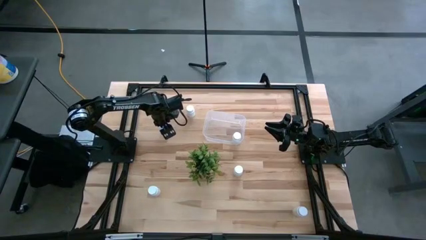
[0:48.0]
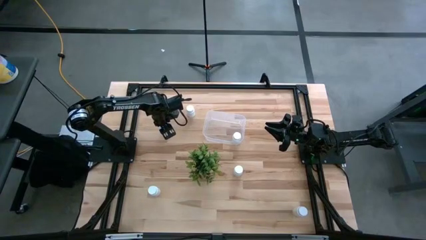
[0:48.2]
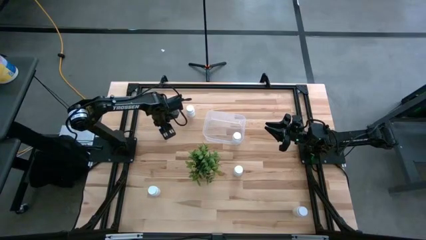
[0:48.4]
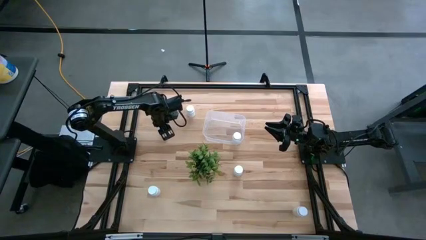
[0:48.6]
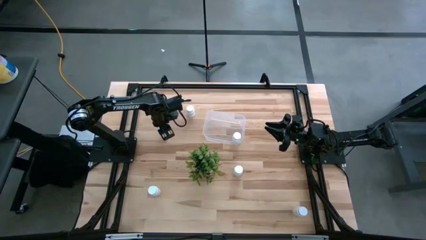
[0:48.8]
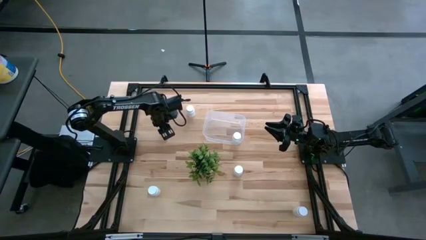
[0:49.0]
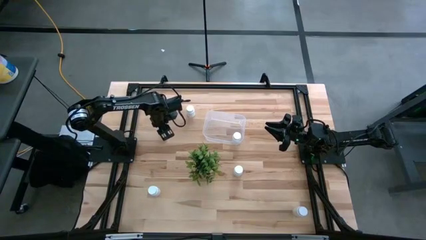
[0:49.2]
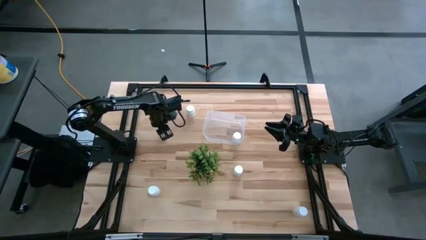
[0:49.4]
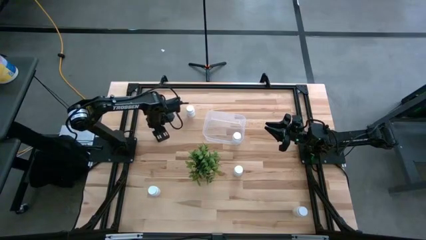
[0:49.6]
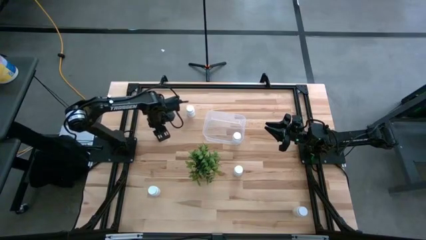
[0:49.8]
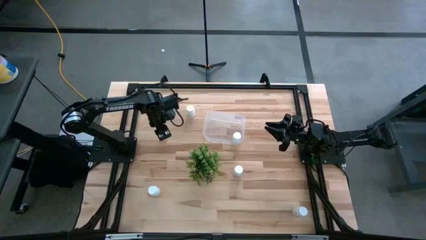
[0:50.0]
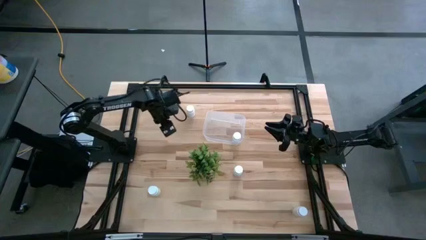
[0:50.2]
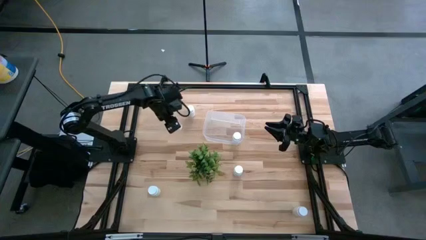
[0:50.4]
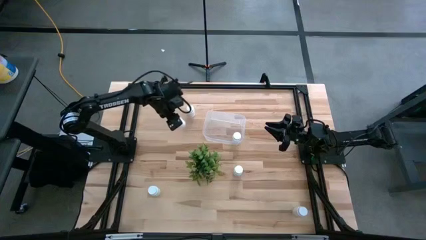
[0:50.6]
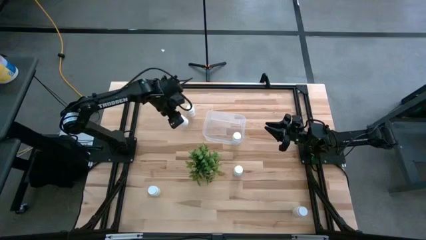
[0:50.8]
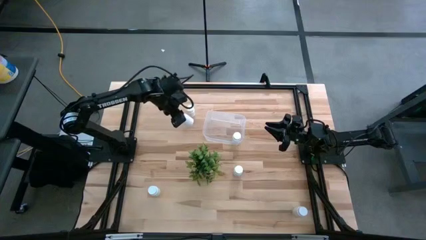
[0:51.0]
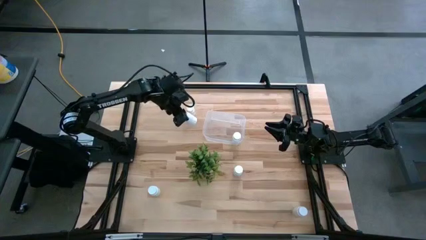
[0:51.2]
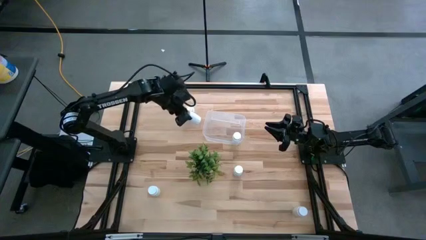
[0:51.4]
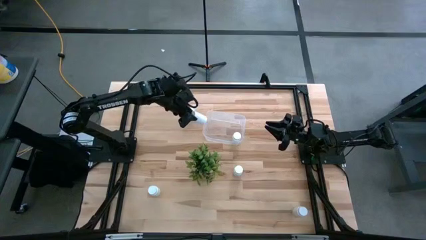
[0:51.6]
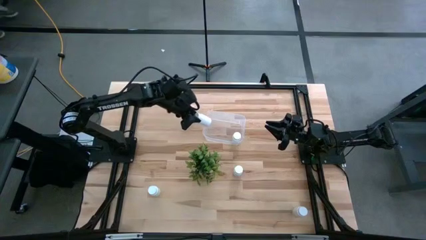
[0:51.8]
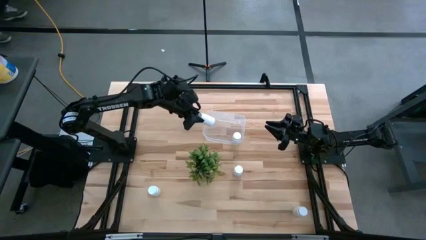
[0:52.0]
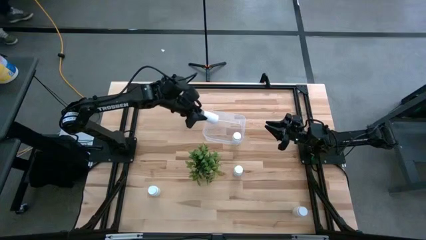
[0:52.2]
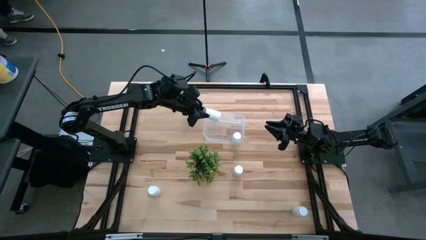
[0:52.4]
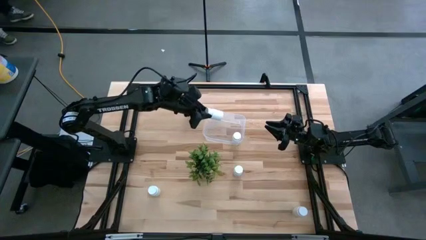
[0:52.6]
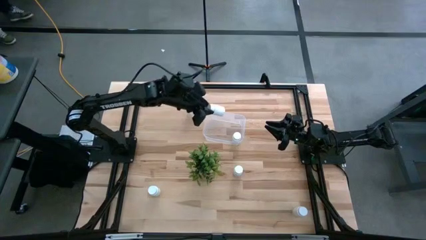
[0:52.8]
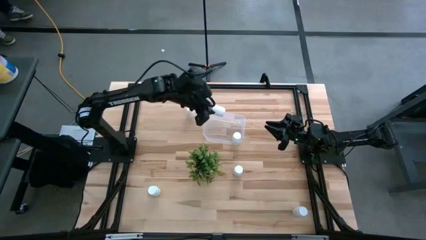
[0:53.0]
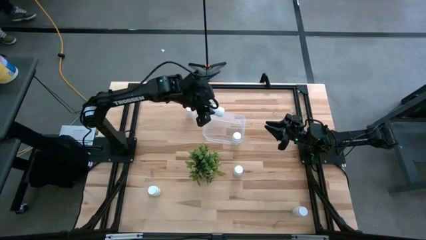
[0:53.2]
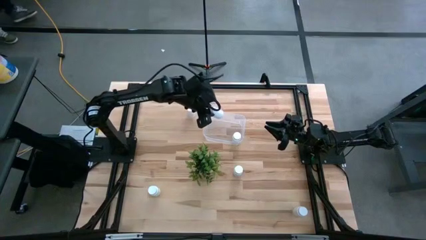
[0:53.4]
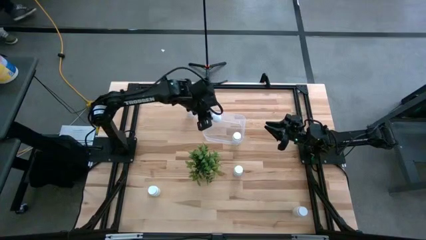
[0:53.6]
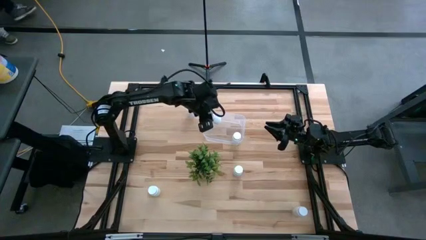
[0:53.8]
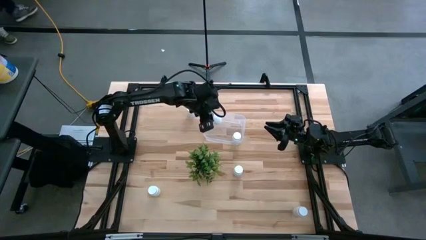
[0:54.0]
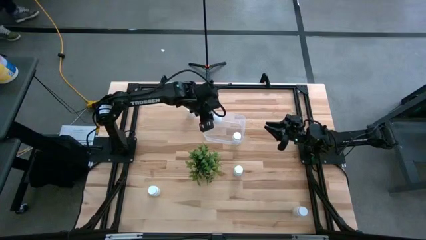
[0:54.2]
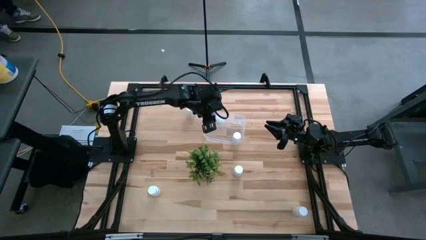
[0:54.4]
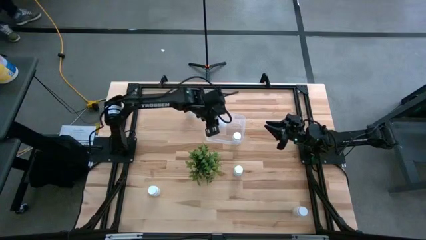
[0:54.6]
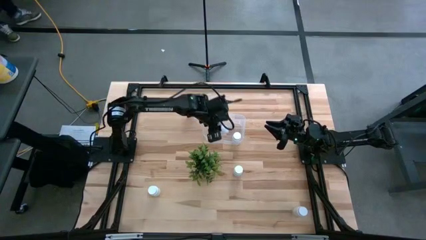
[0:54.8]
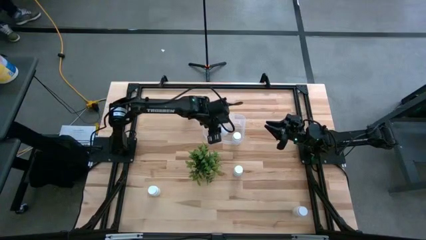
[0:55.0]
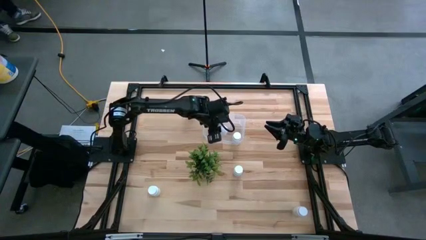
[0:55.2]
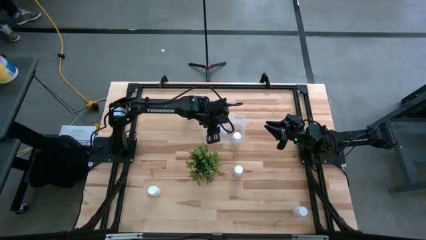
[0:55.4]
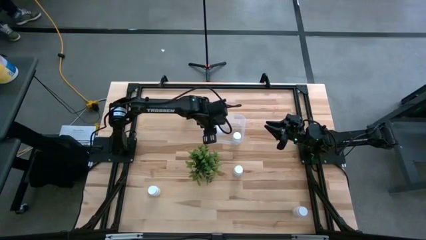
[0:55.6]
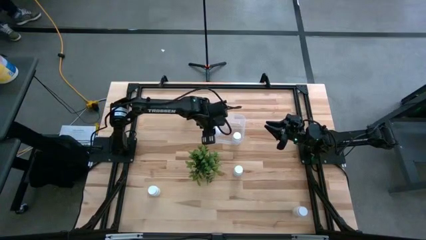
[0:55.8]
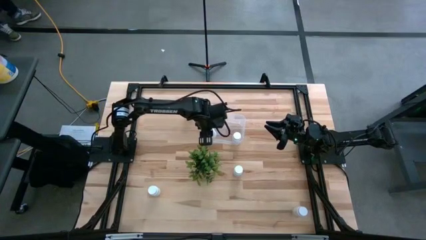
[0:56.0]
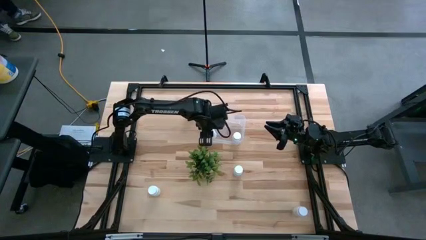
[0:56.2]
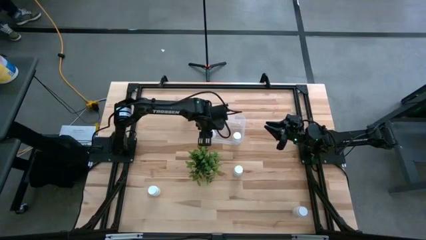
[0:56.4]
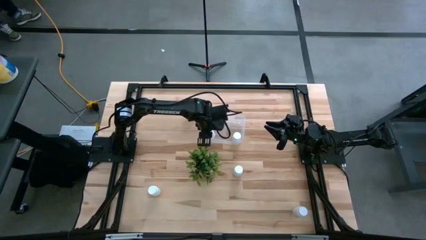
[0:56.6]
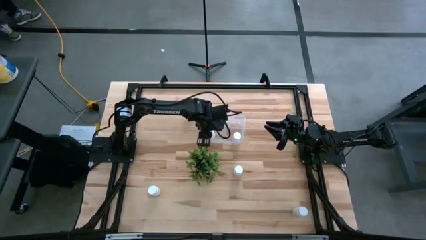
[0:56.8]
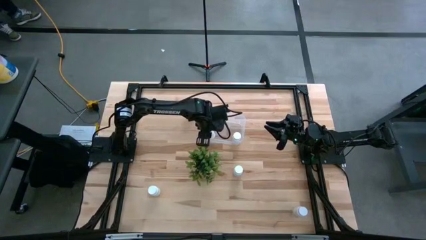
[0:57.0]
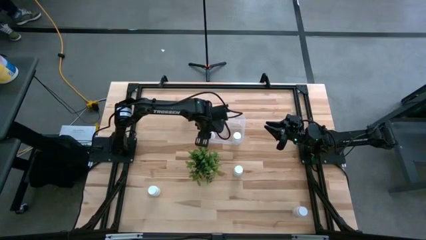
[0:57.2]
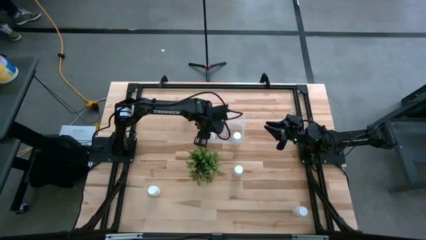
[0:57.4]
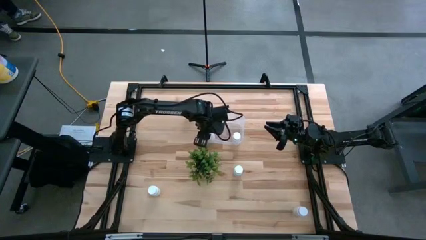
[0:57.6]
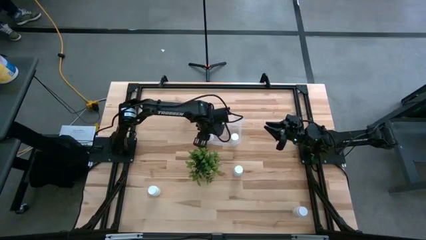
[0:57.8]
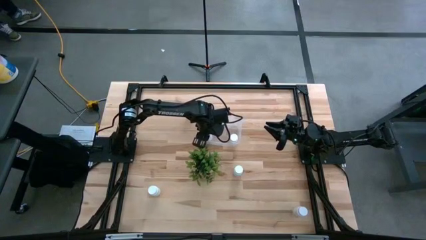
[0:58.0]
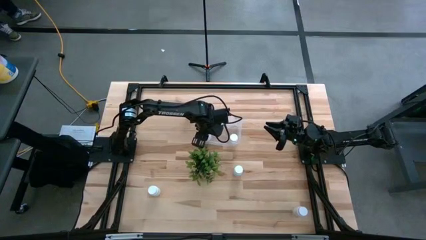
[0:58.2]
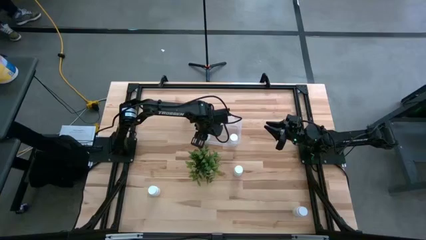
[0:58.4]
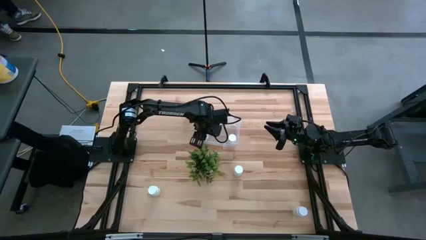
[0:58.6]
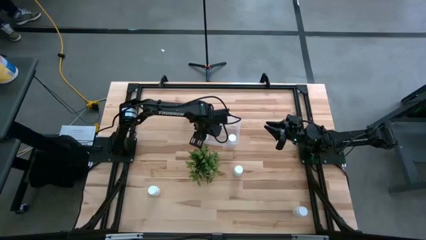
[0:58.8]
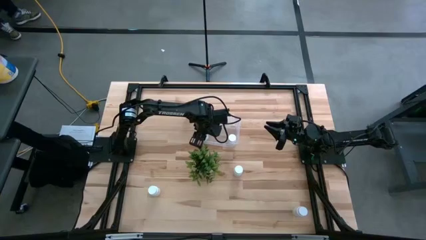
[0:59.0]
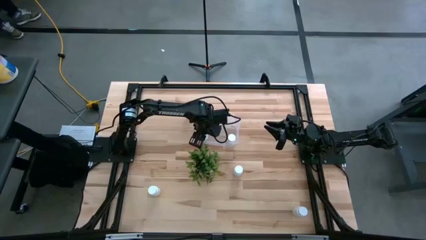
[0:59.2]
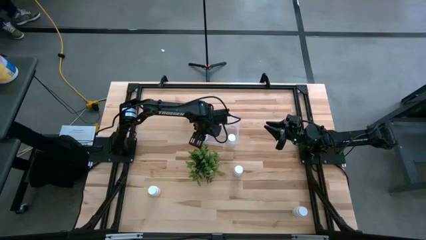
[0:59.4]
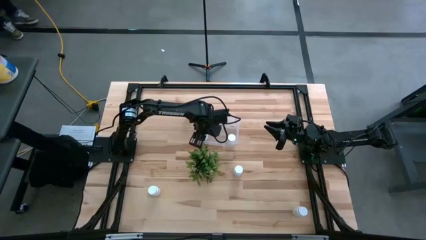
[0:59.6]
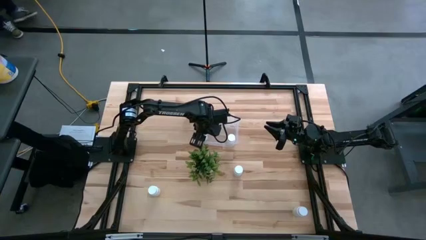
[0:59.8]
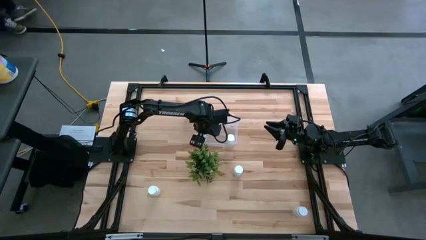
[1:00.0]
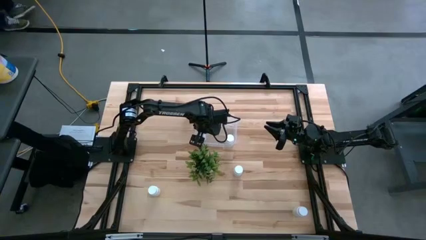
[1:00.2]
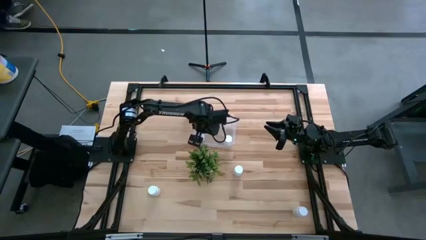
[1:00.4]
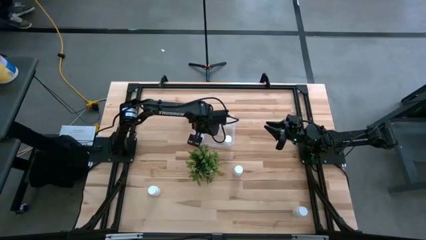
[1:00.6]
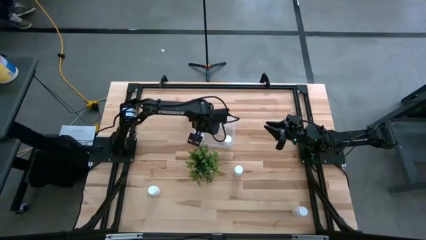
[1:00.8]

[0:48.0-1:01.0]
Task: Pick and place pill bottles into a basket
Put the white pill bottle in the transparent bin
